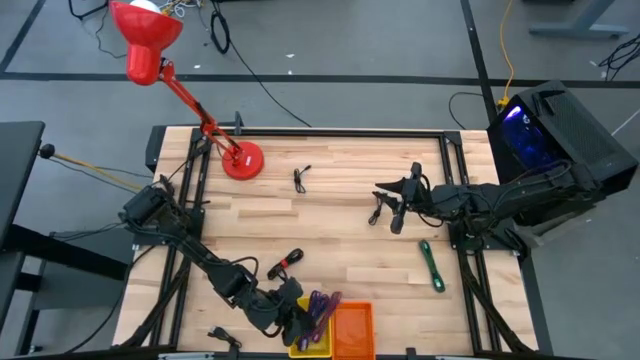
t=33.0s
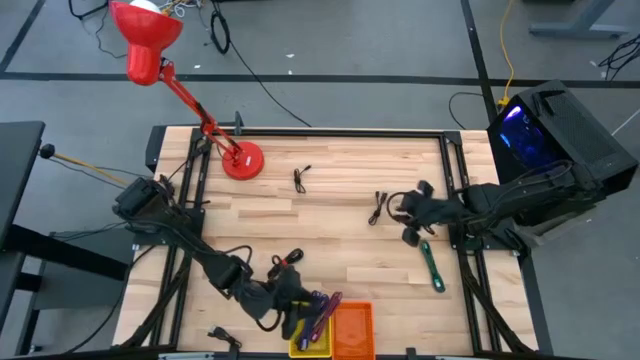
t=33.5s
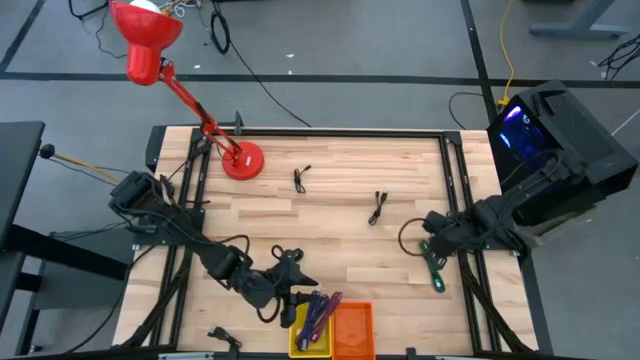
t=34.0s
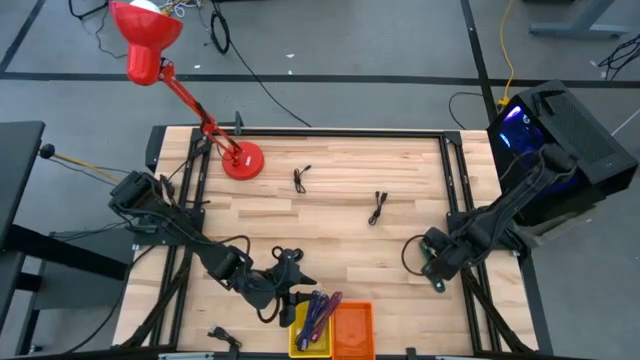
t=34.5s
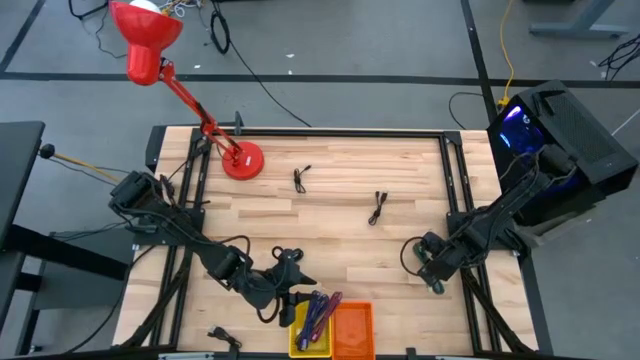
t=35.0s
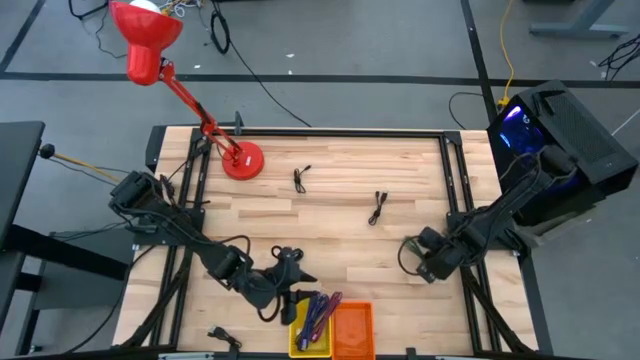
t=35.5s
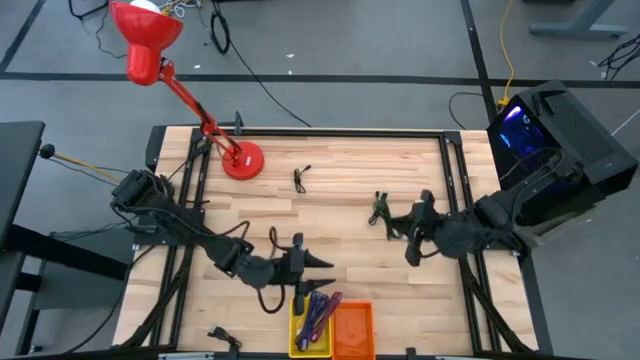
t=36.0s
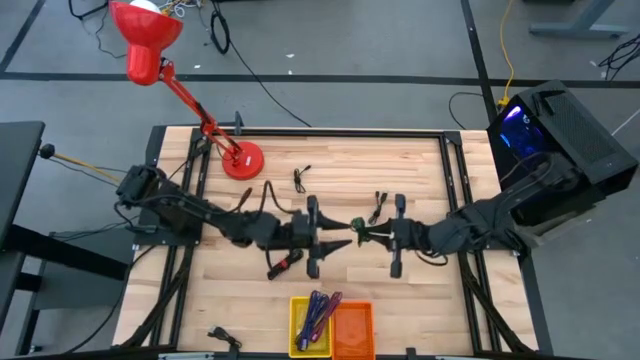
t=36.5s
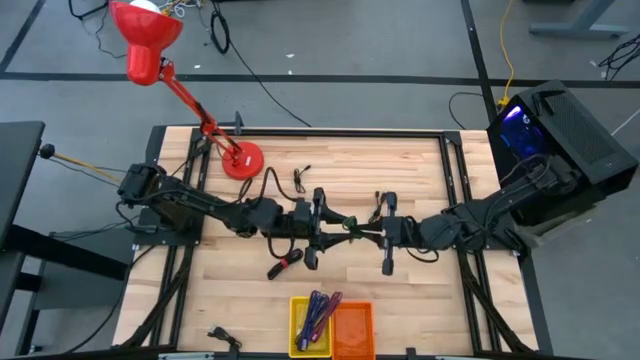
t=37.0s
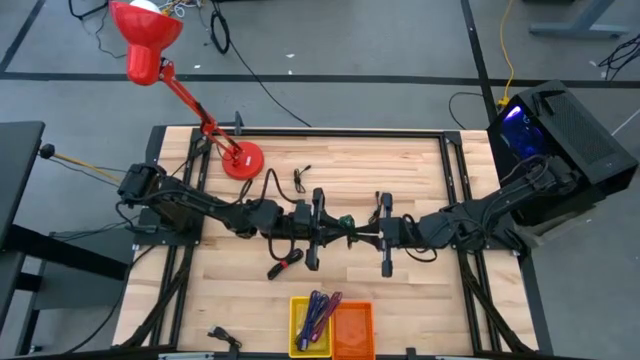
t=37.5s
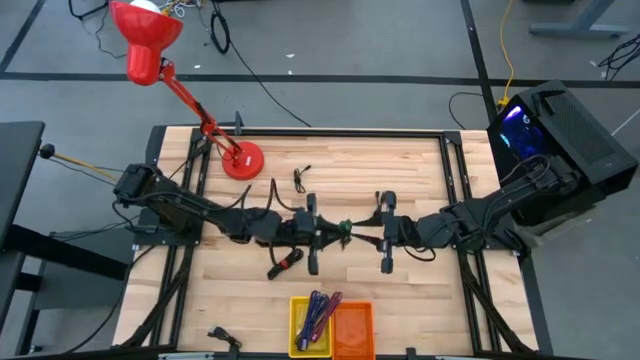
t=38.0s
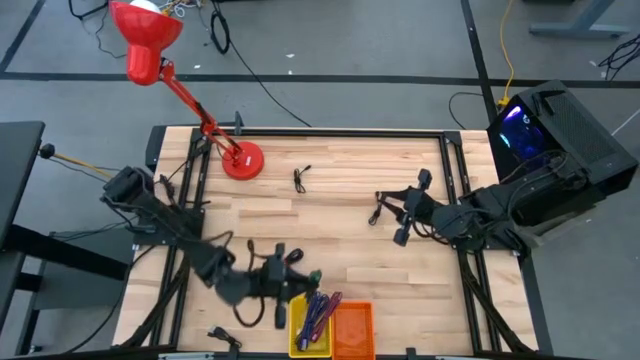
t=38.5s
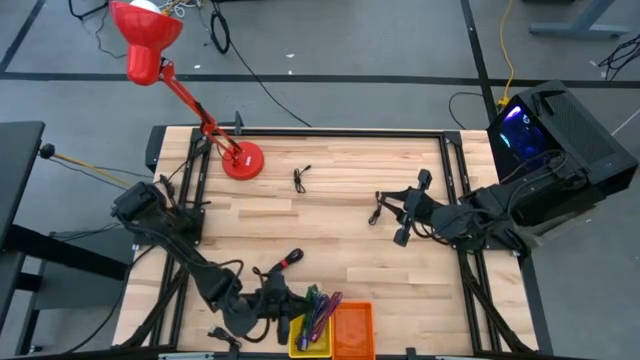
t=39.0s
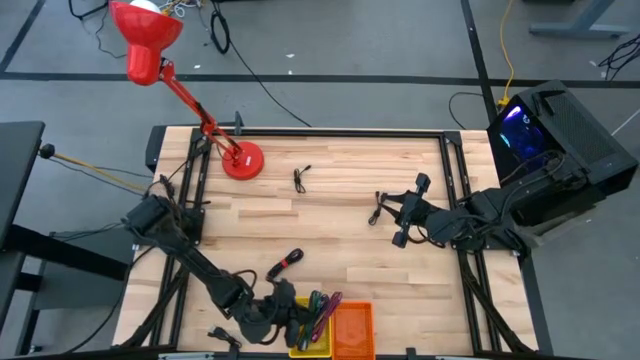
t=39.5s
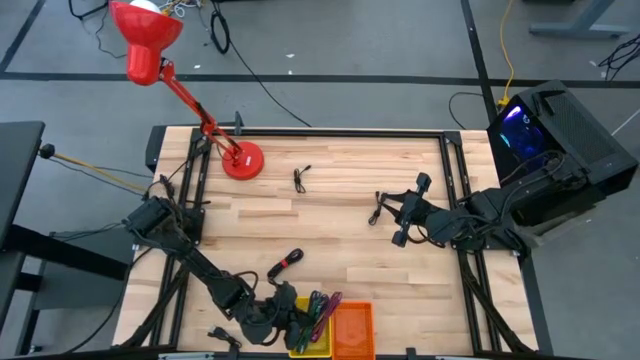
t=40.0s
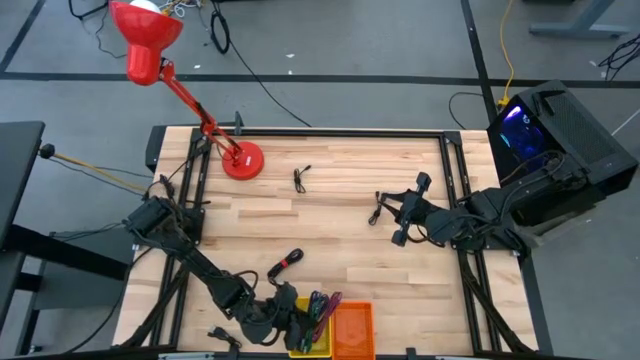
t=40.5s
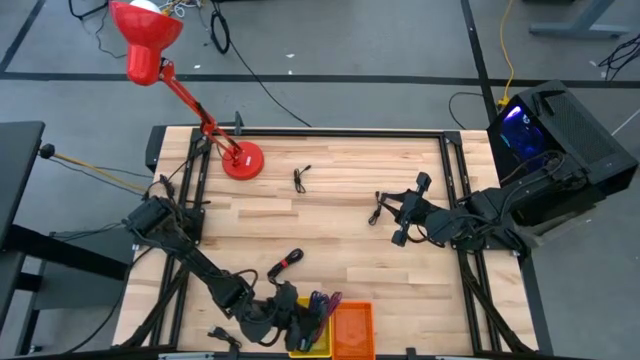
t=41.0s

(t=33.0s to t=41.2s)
Task: Pick & Place USB Port
Put the green charger cable into the yellow bin

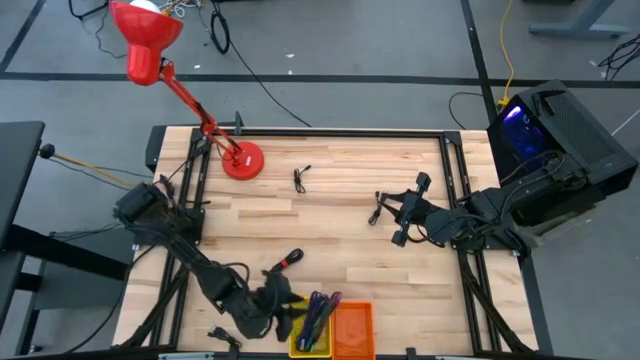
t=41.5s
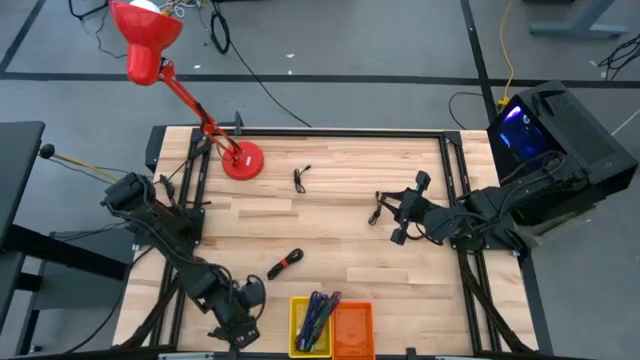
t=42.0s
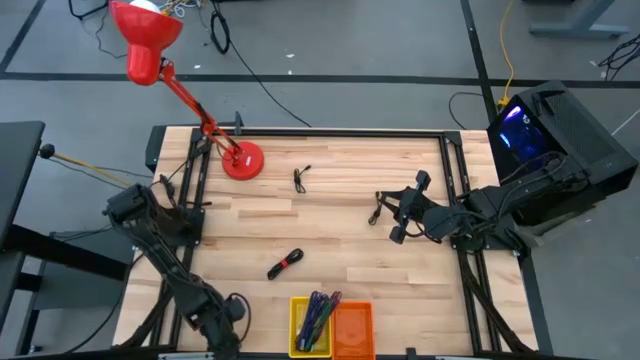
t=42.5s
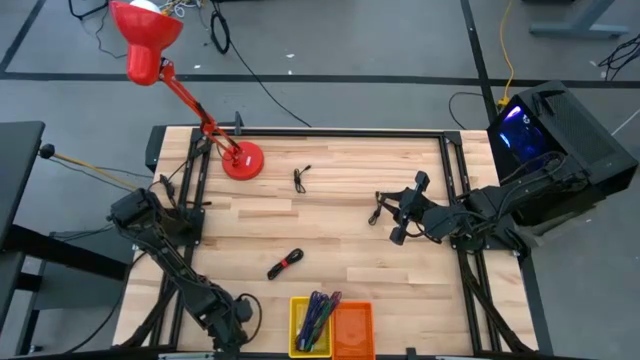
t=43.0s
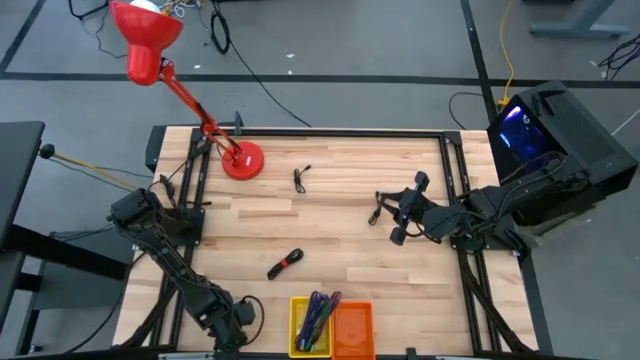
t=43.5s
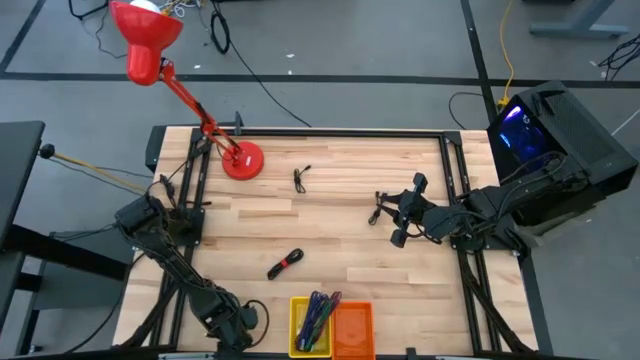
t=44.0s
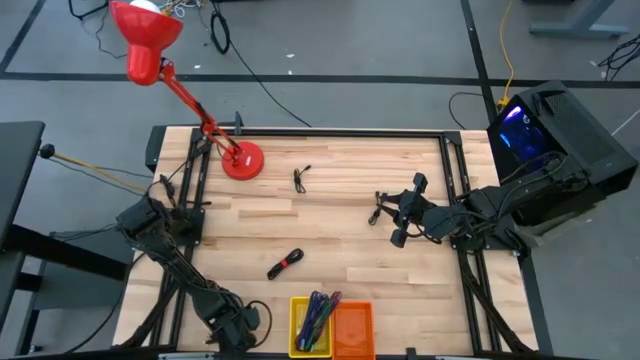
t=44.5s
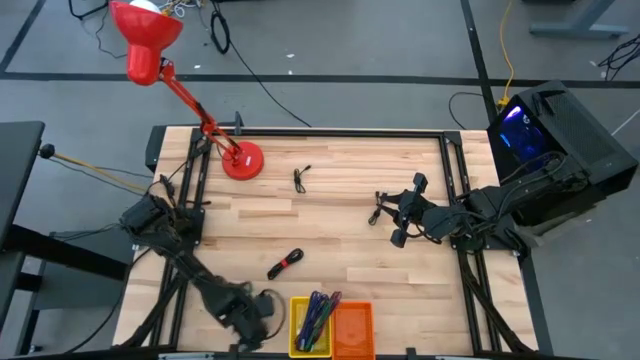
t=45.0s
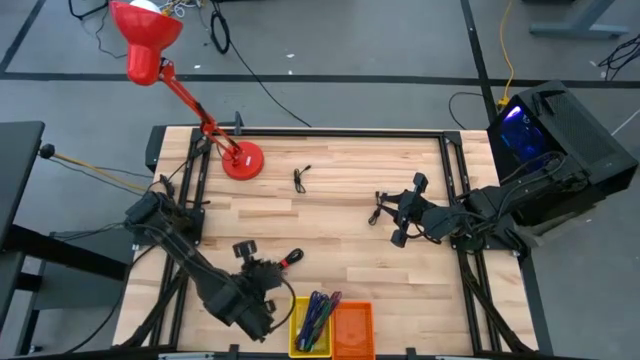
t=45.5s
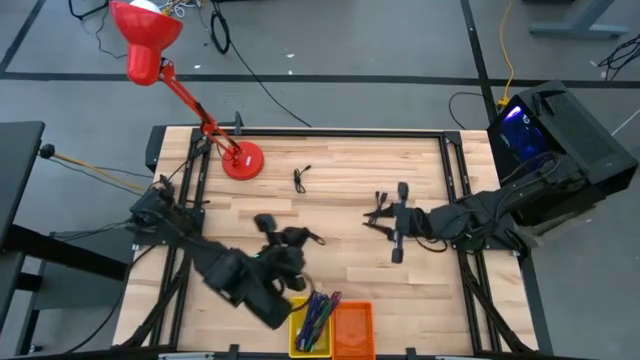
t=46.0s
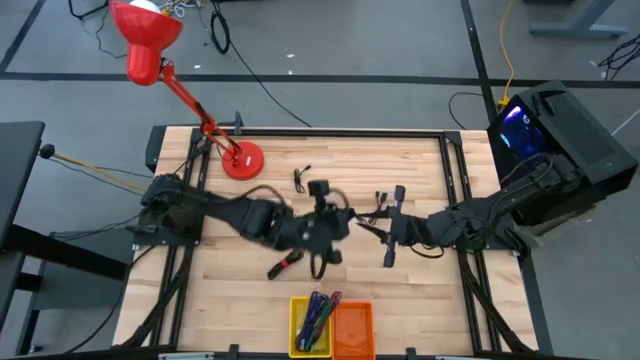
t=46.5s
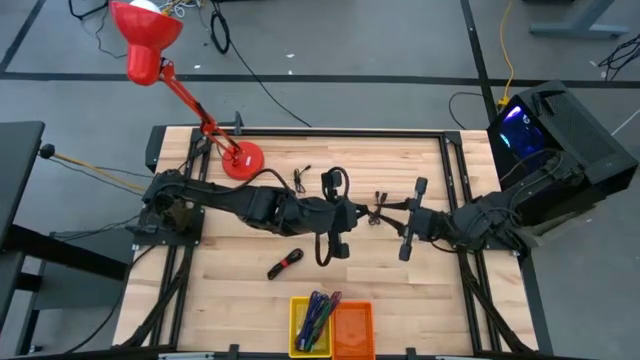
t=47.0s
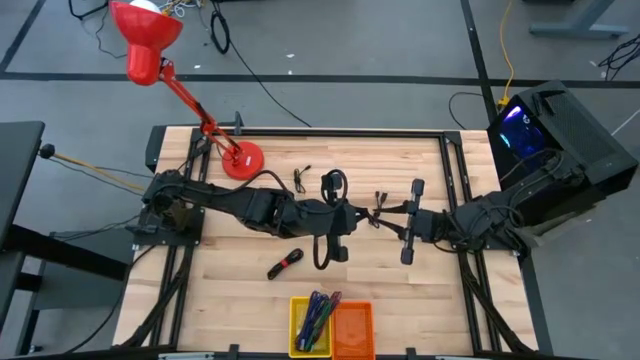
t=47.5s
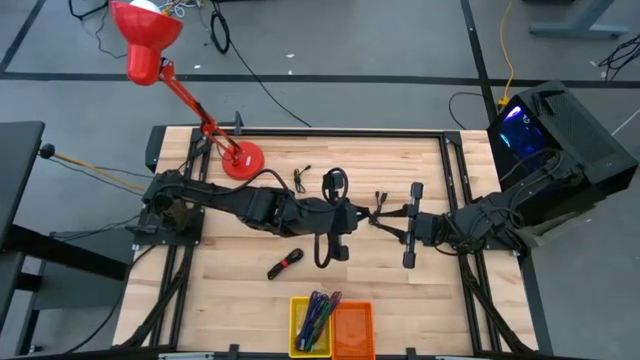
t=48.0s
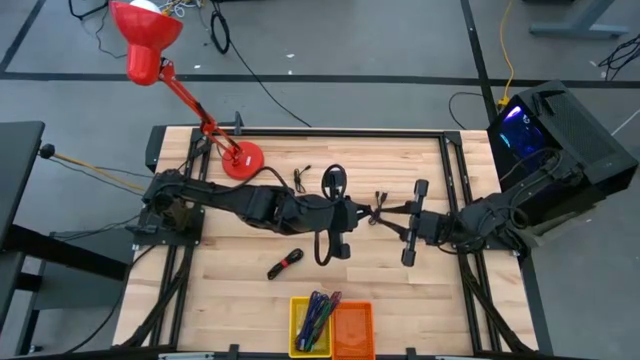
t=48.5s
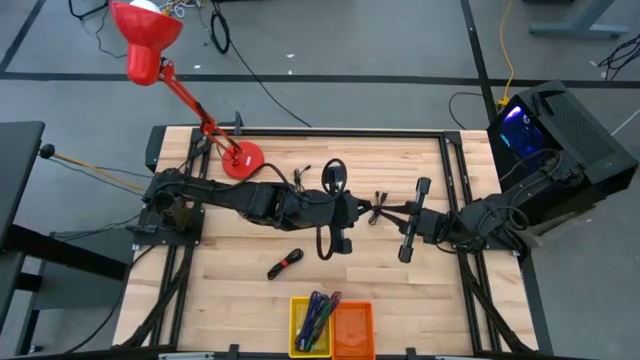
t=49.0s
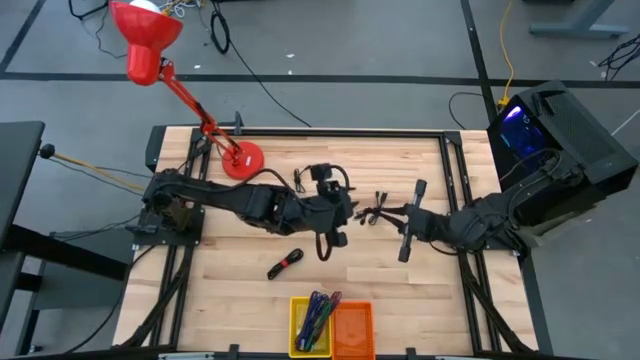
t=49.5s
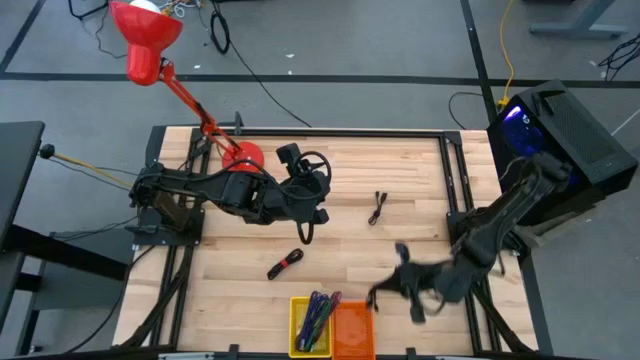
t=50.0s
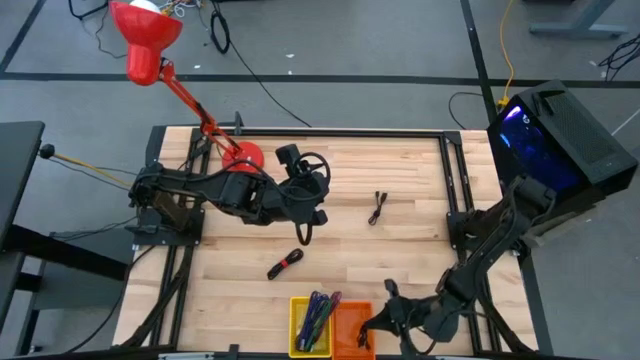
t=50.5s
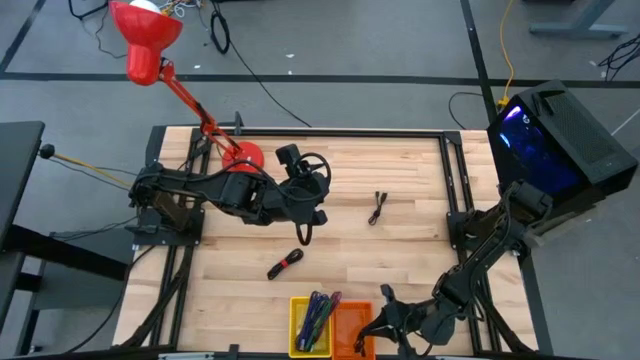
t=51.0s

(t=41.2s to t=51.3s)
Put the black USB cable into the orange bin

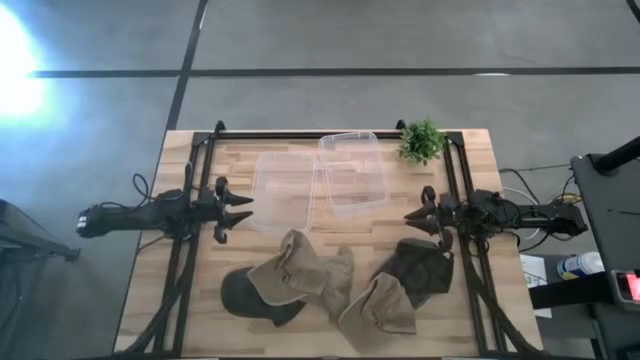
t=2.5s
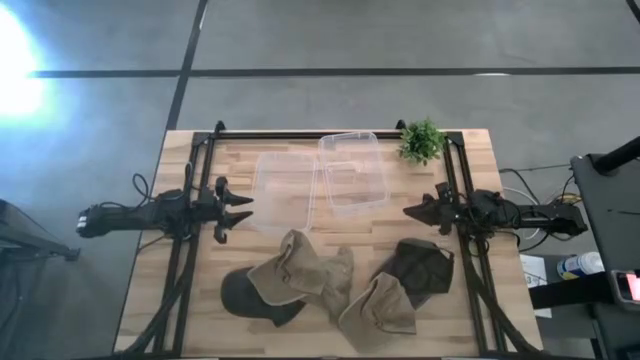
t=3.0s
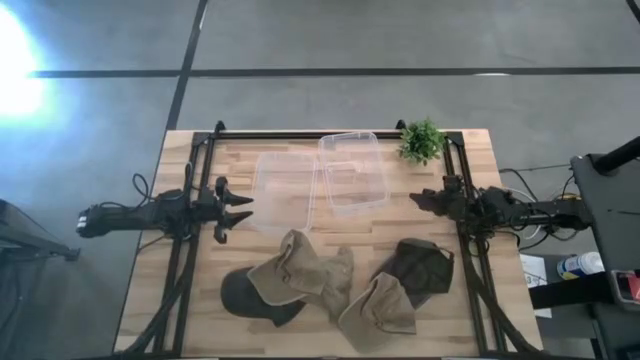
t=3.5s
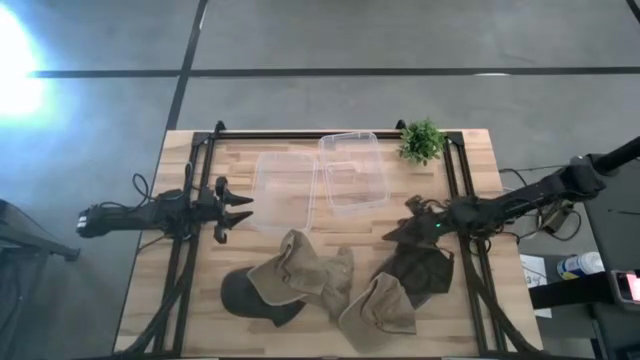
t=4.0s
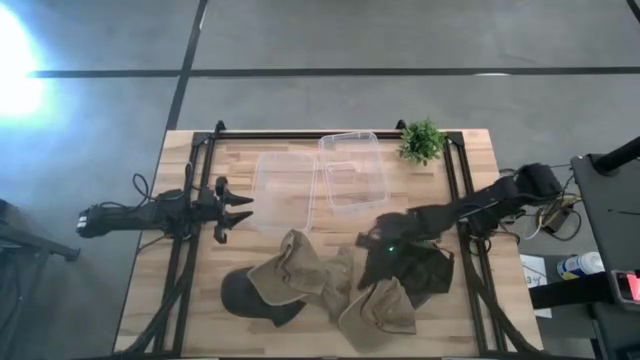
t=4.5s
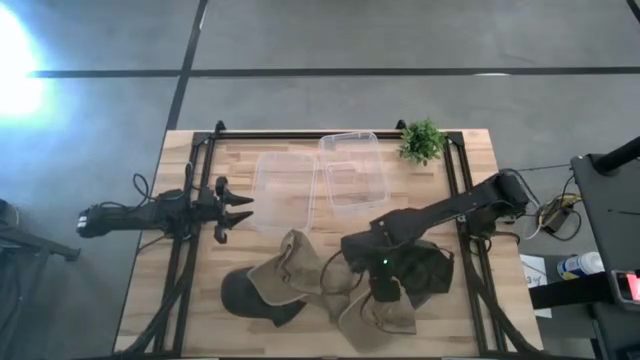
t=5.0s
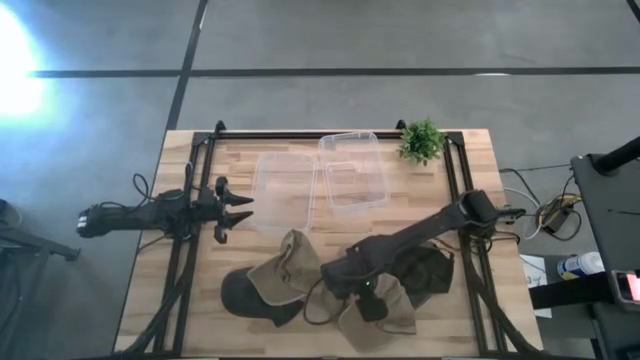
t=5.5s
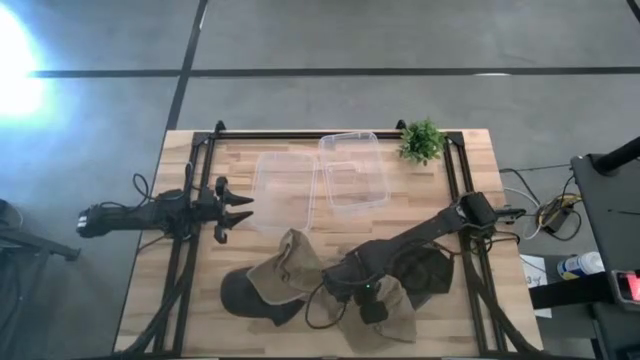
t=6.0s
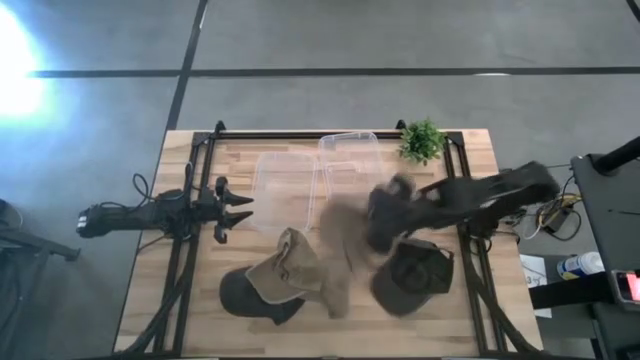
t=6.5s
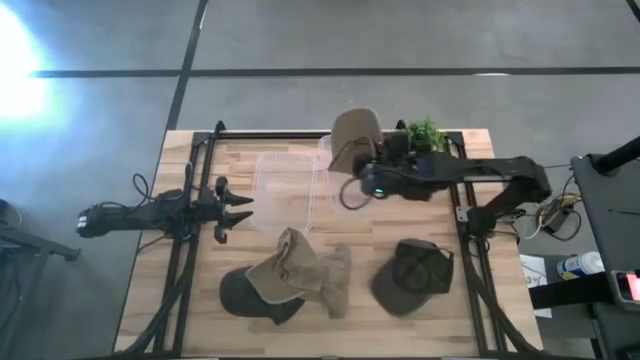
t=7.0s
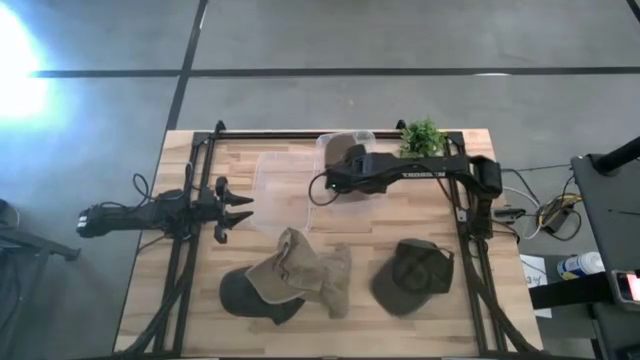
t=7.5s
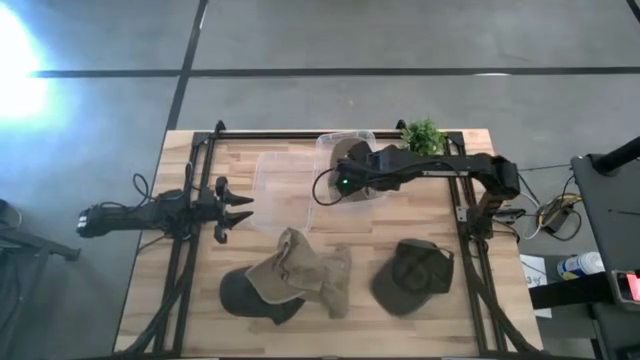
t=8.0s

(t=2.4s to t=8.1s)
Task: Pick & Place hat
Put the right brown cap into the right transparent bin
